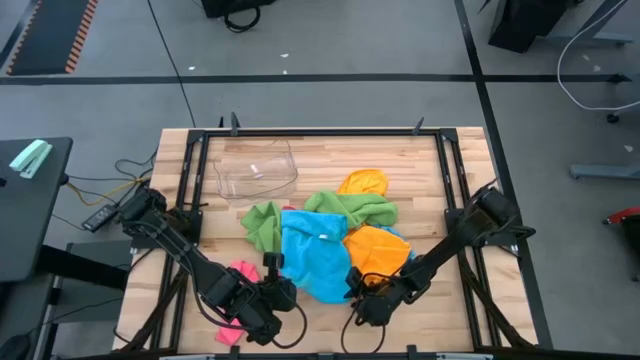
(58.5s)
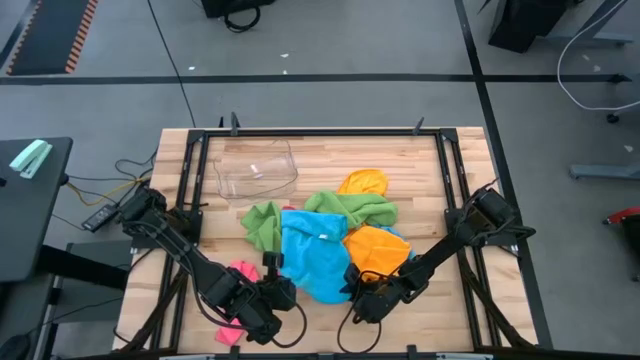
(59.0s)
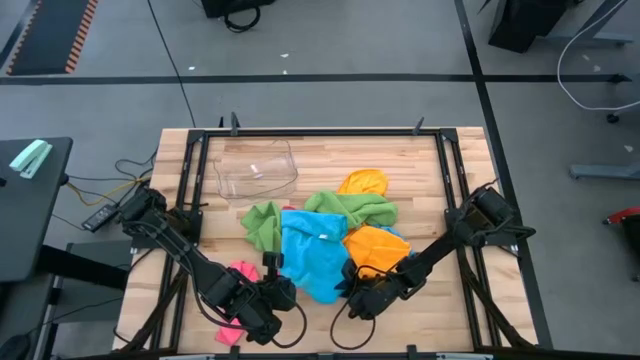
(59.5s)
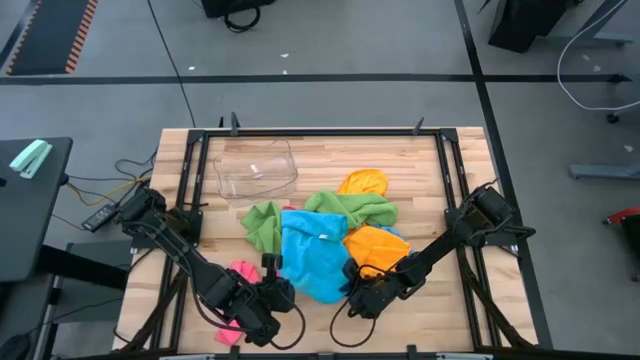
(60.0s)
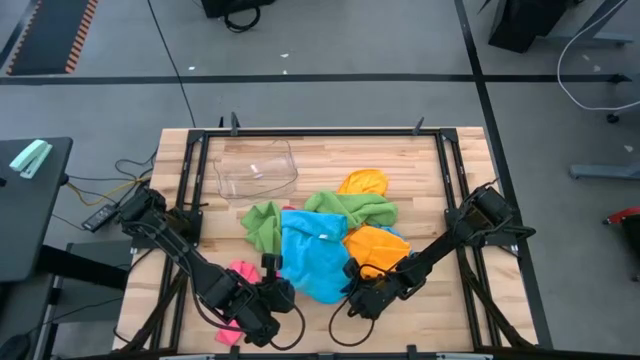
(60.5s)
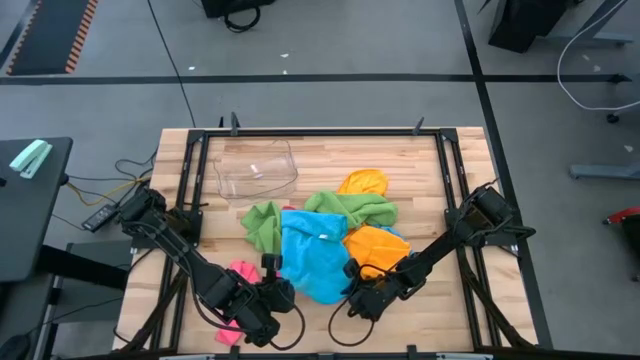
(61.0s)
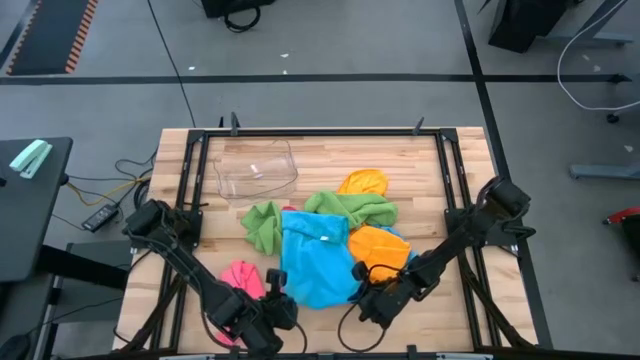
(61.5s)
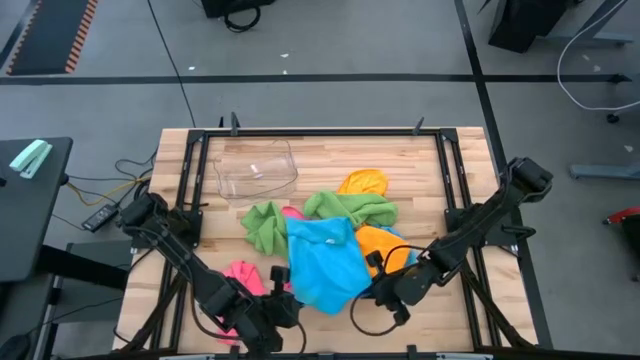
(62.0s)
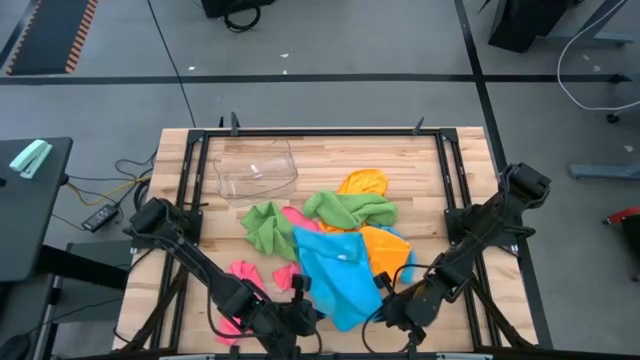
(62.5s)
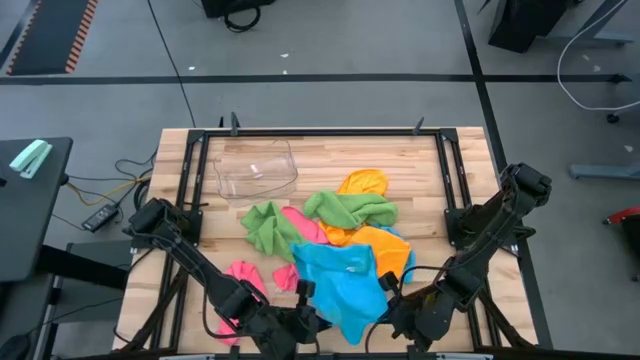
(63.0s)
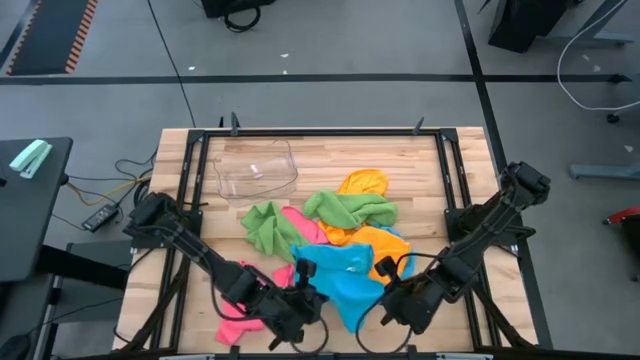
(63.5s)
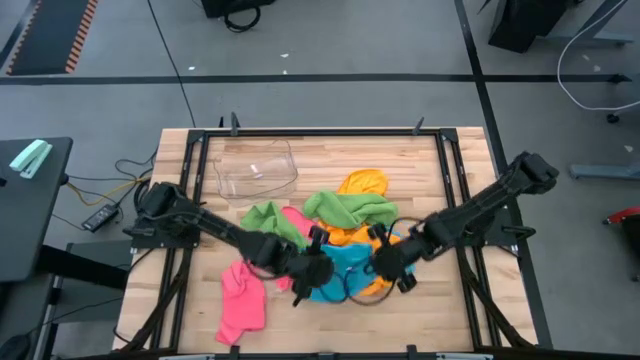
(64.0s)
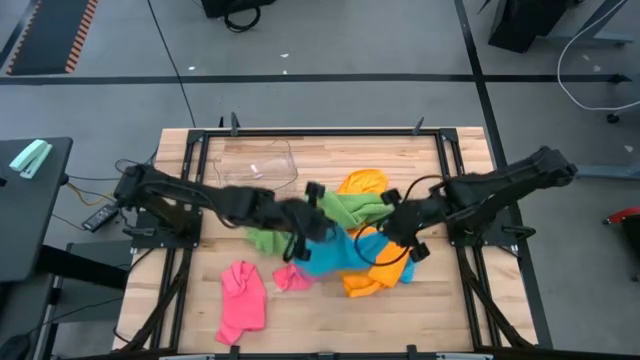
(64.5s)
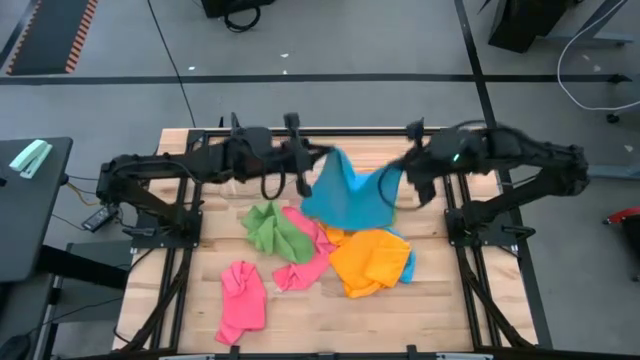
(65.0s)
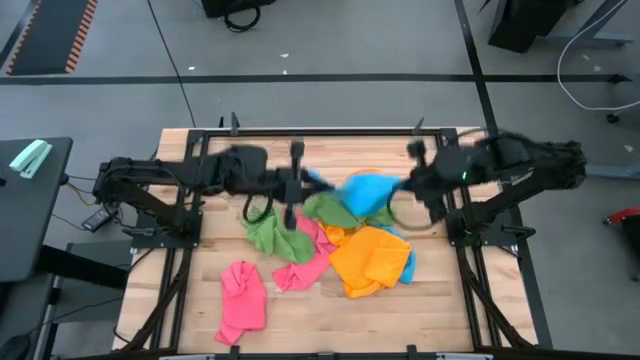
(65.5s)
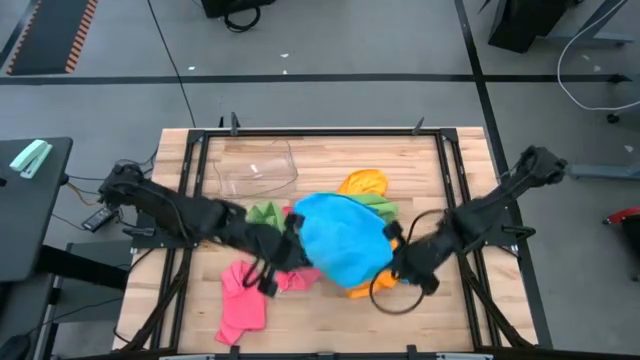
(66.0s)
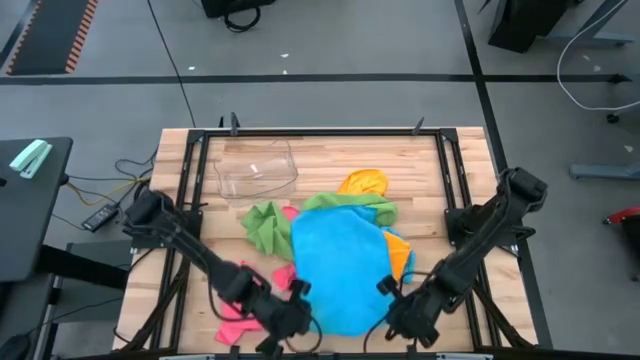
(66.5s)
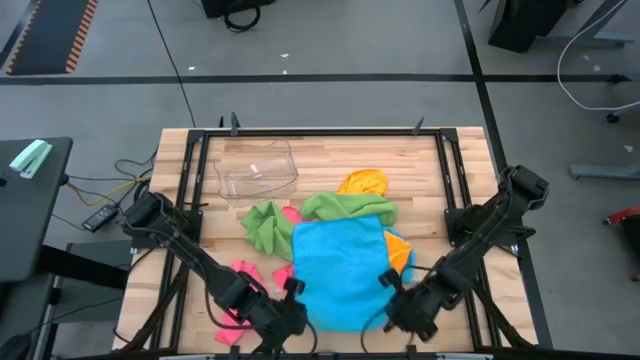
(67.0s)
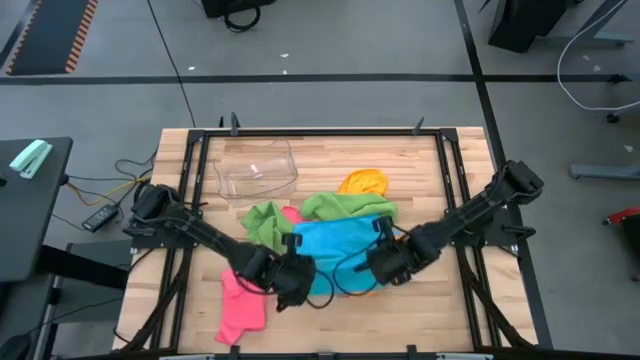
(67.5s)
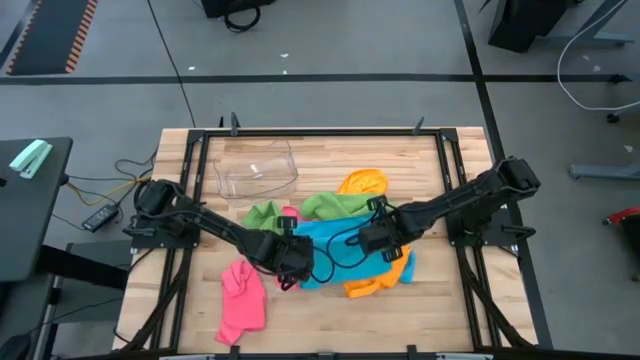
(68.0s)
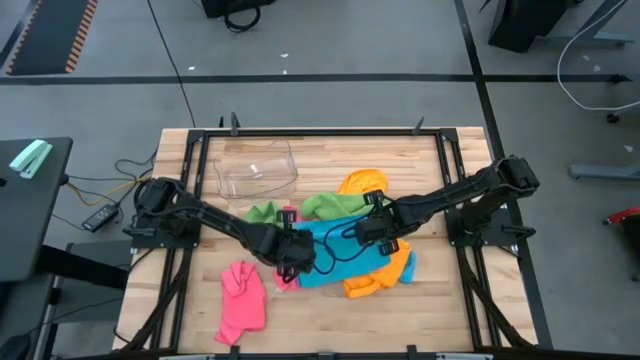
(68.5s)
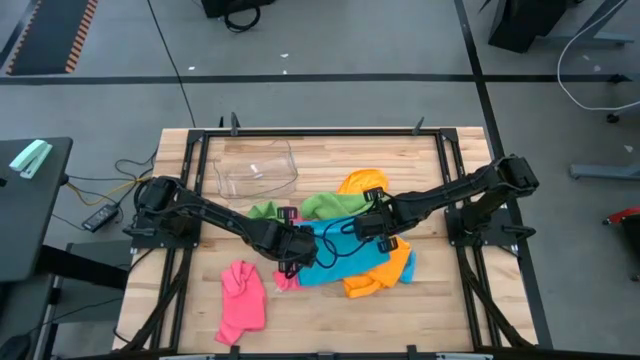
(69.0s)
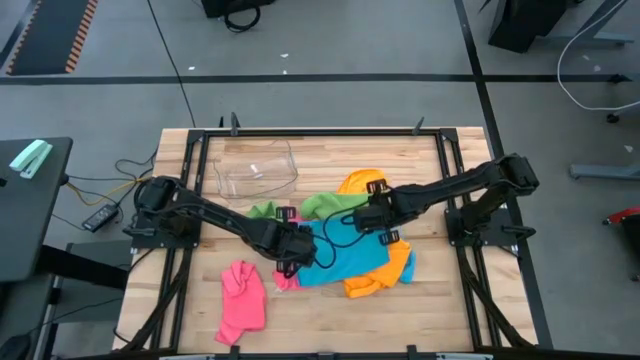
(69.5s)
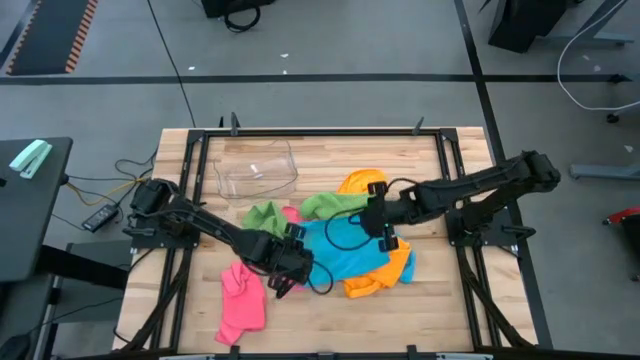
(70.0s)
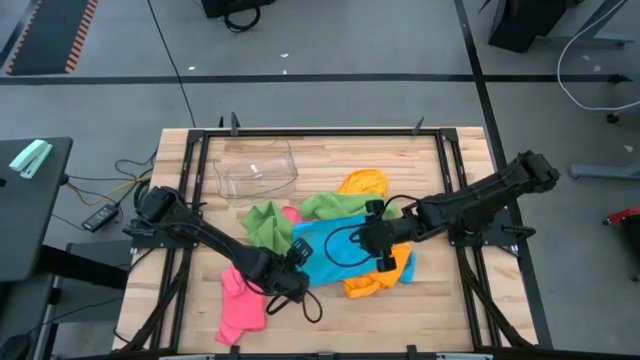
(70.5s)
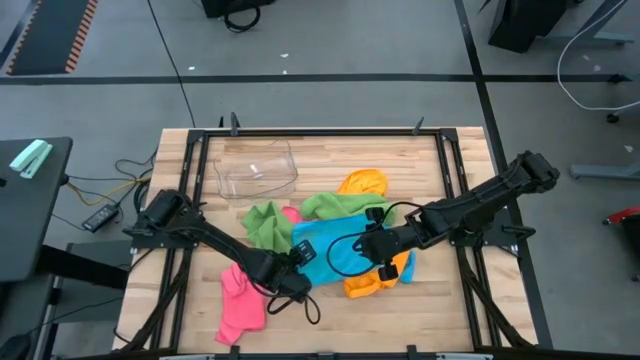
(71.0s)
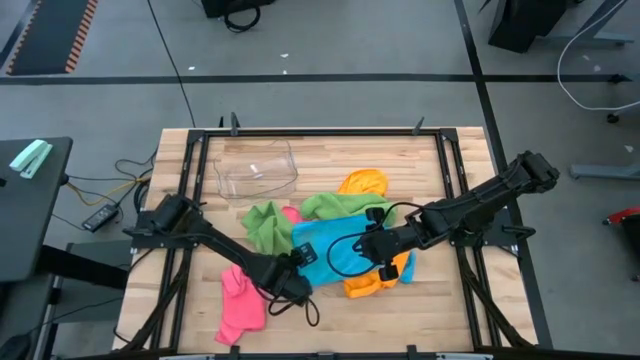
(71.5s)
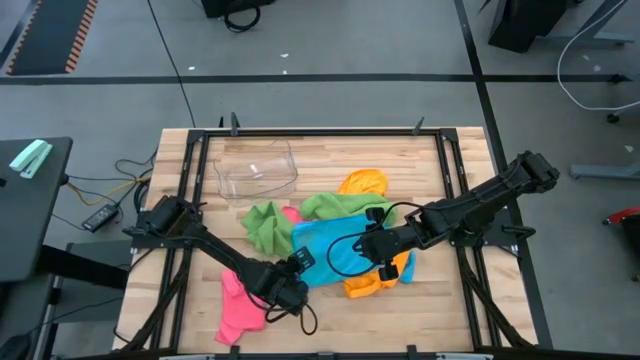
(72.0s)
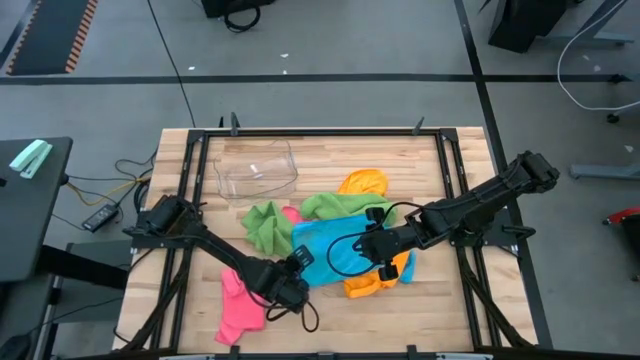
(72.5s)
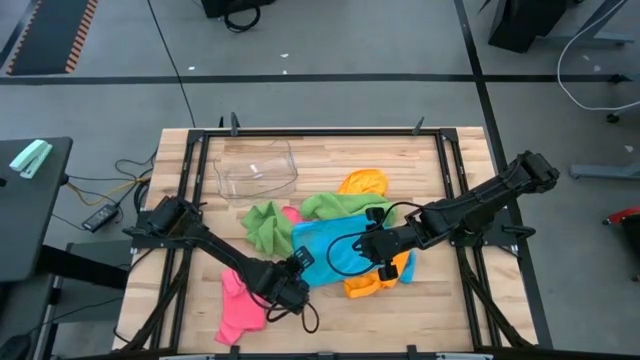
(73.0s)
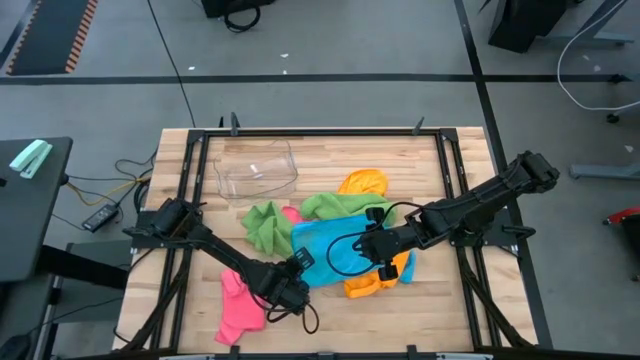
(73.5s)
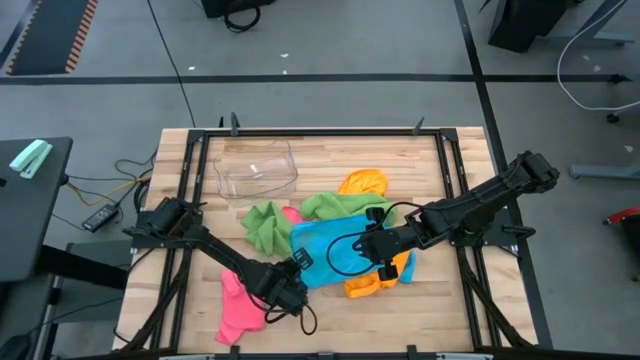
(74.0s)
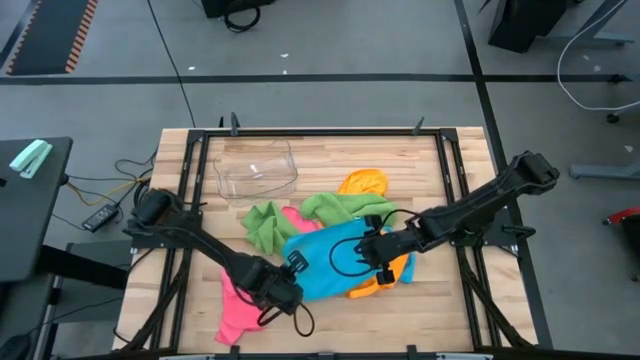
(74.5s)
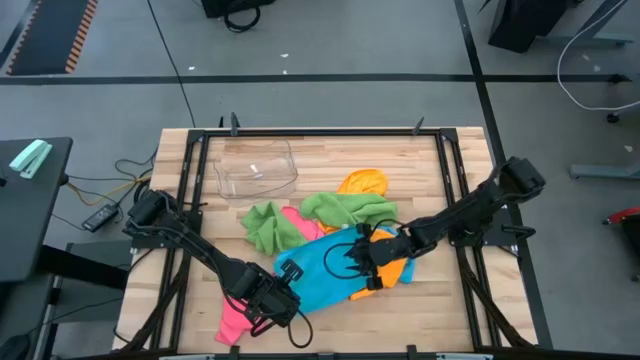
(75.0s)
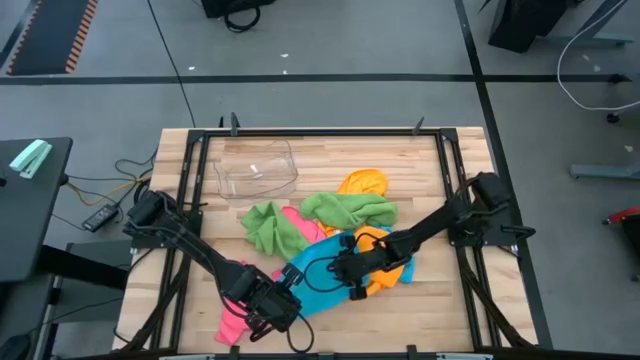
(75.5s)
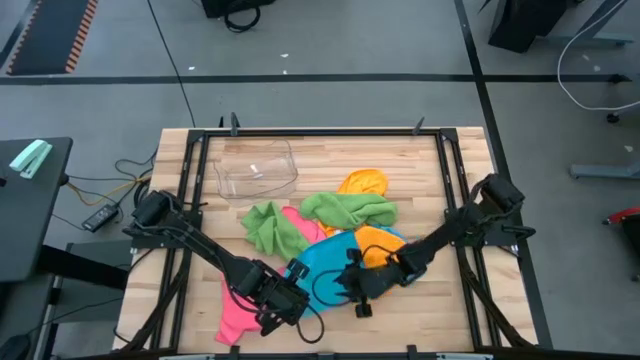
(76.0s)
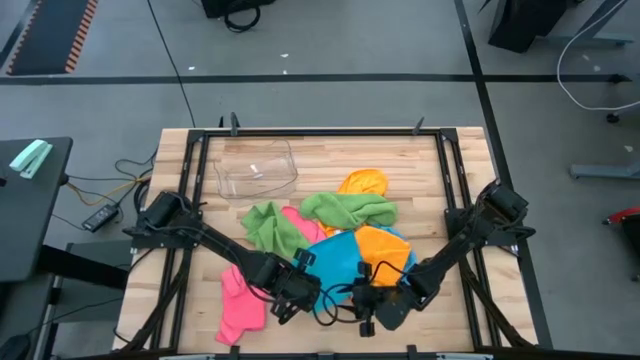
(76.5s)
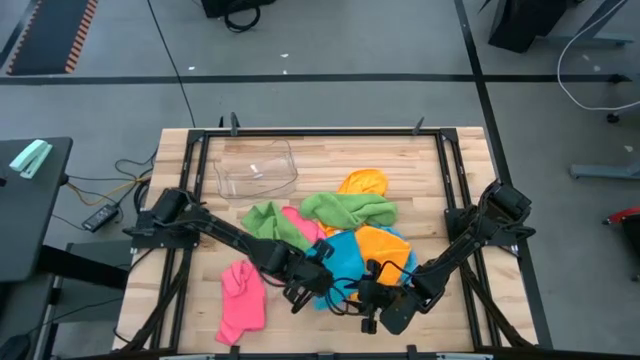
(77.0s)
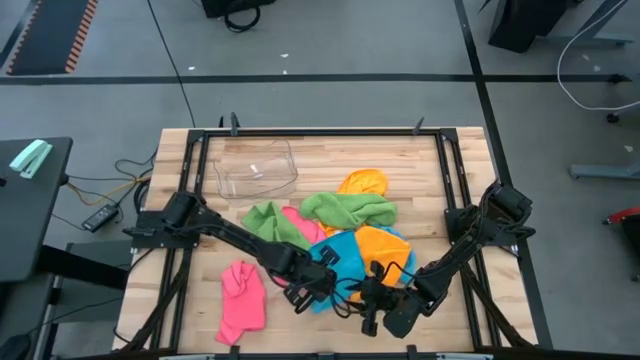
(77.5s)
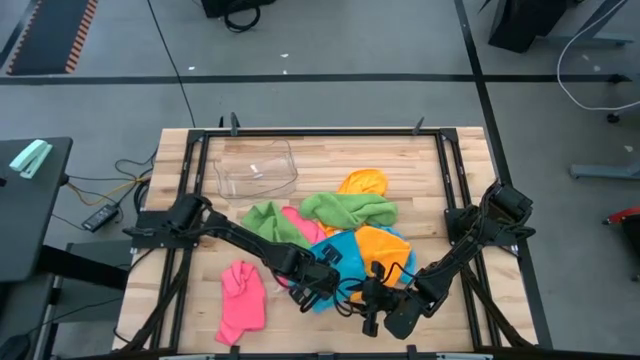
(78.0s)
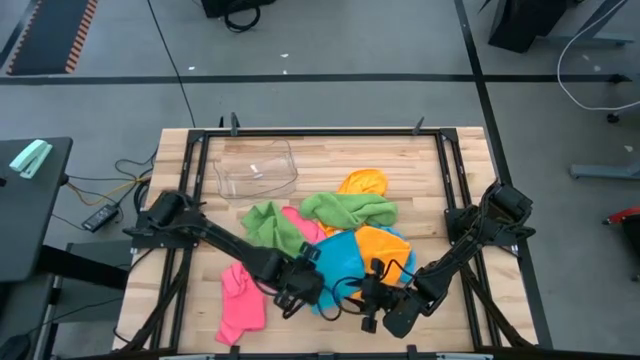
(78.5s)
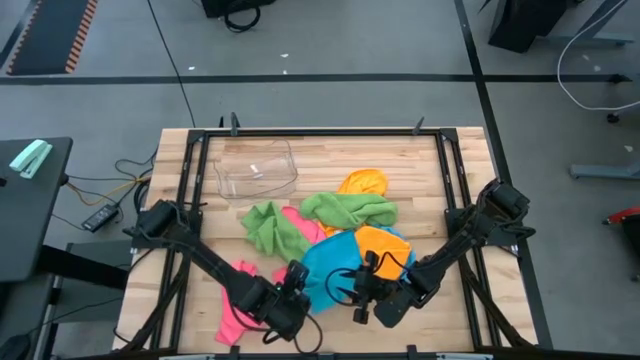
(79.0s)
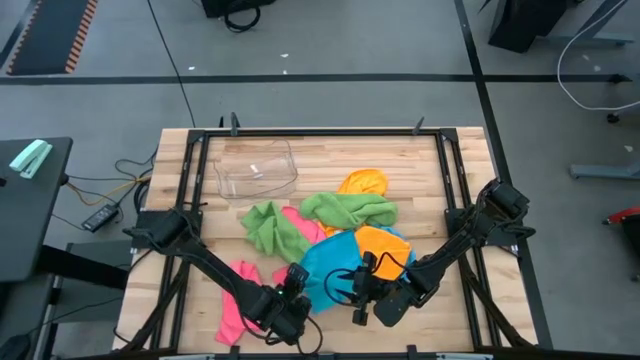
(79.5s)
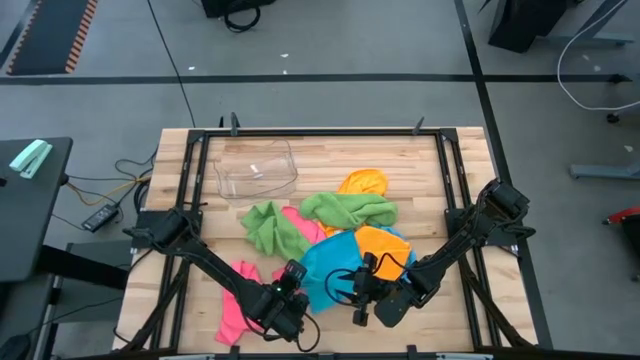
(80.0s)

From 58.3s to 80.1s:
Task: Fold microfiber towels
Fold the left blue microfiber towel
